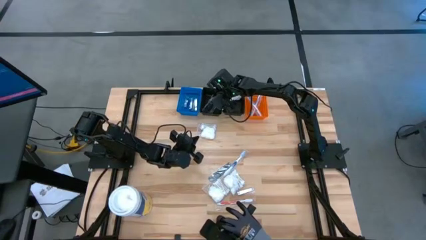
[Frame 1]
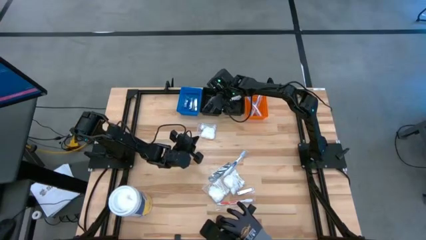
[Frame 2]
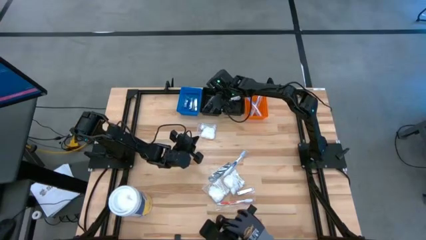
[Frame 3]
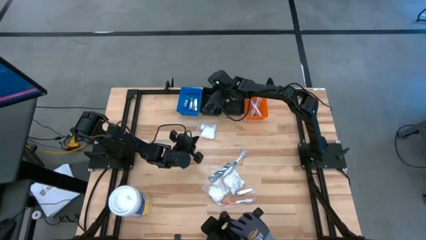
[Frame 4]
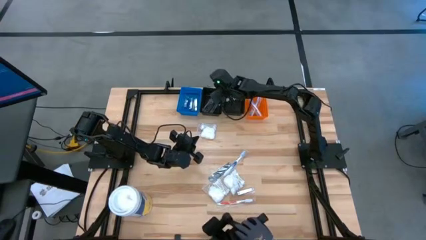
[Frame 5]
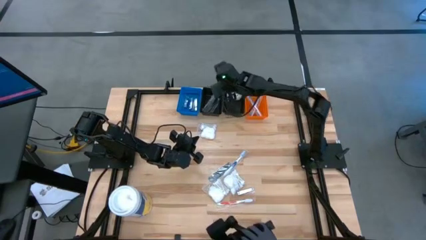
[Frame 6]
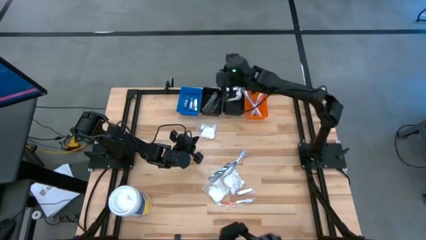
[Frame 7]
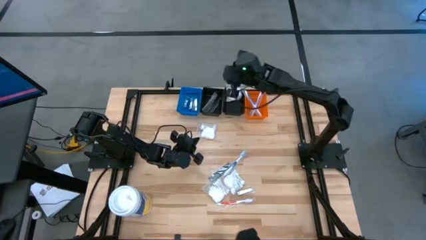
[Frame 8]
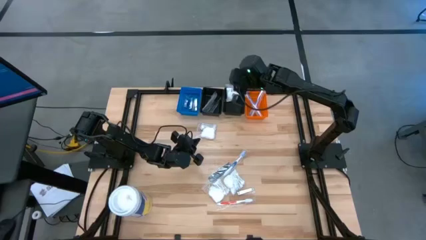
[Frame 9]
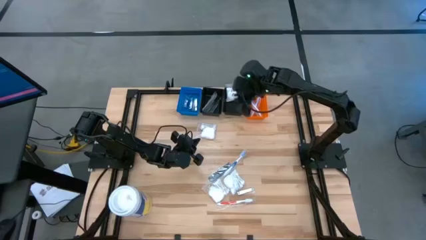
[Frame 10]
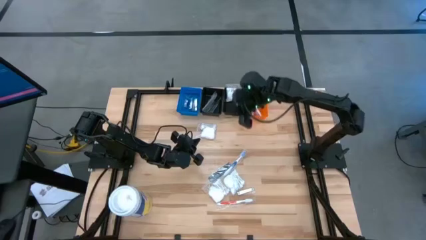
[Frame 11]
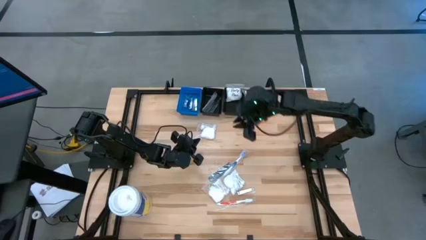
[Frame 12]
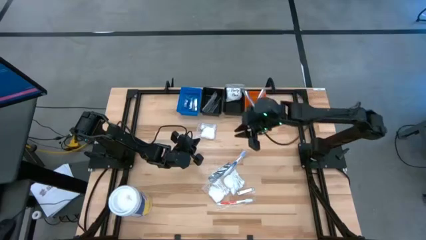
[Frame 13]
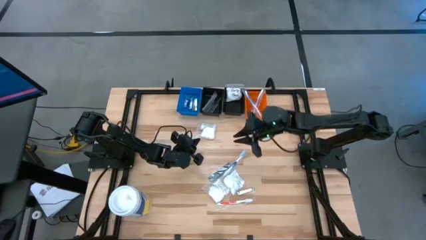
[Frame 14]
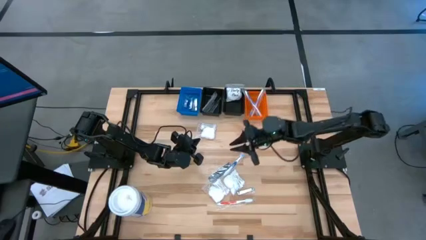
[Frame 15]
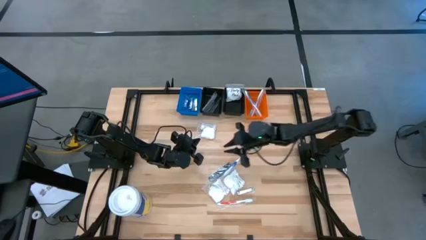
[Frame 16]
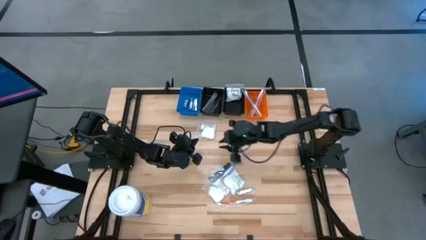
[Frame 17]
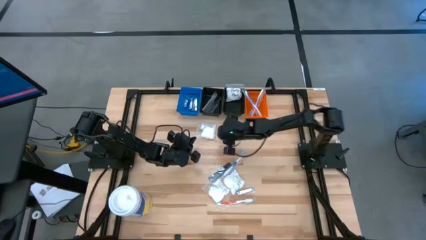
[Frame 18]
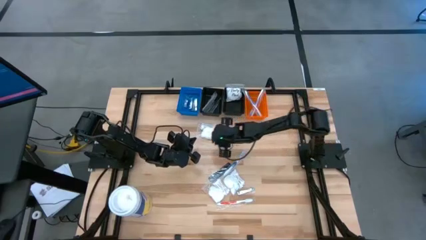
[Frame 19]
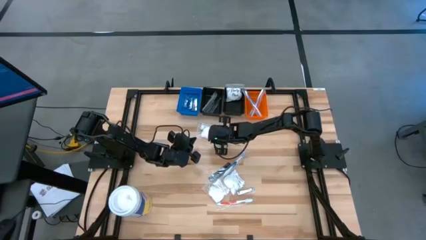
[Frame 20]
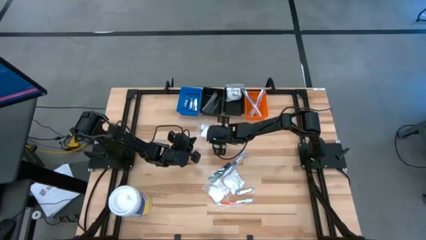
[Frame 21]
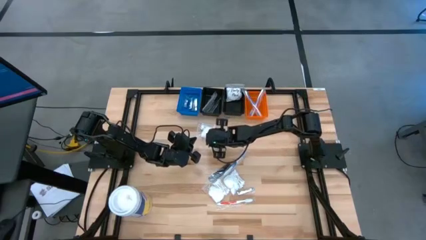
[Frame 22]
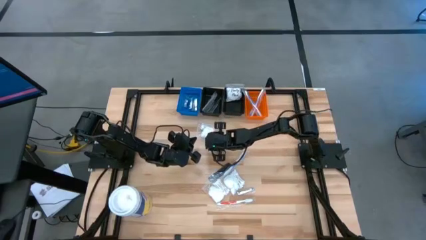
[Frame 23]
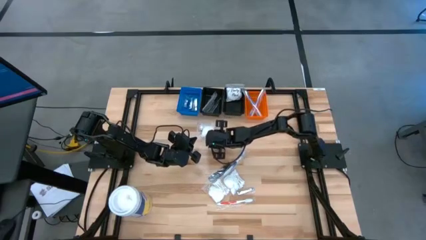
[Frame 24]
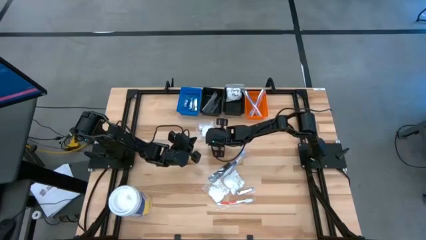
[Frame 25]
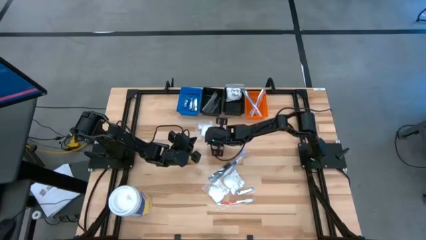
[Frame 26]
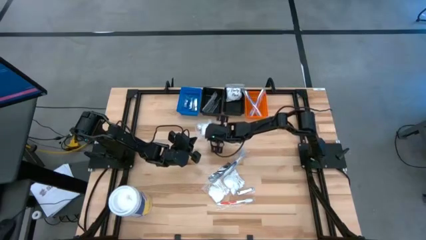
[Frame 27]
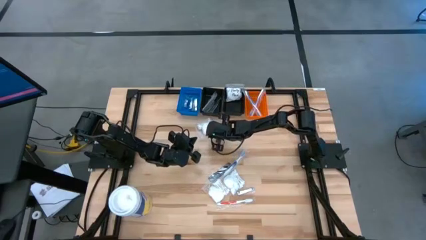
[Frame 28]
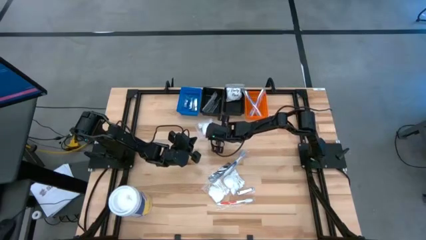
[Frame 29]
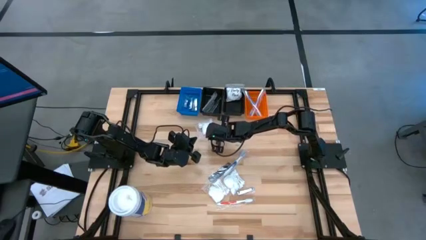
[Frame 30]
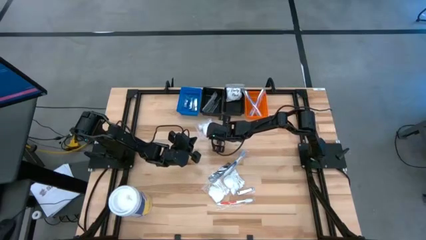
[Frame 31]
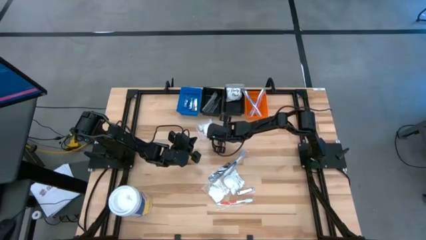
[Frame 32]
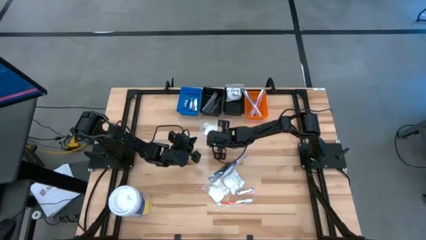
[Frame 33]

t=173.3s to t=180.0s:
Task: Pick & Place Travel size toiletries
Put the white vanity pack into the right black bin

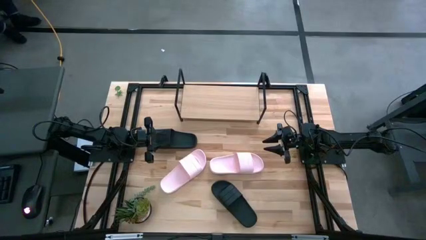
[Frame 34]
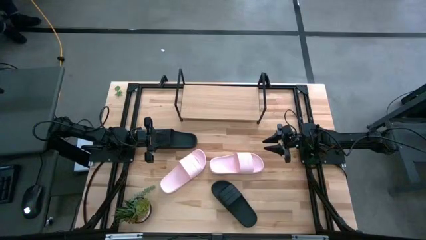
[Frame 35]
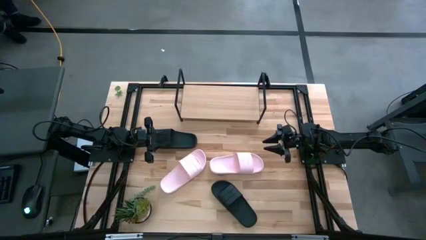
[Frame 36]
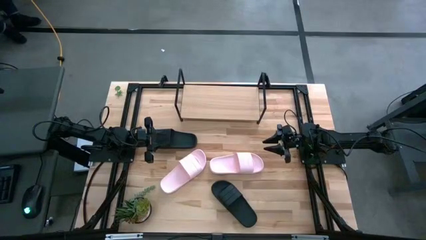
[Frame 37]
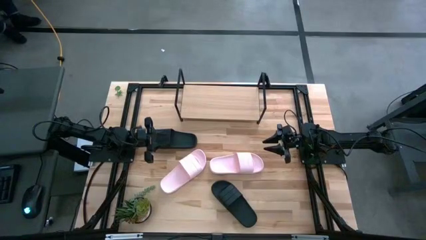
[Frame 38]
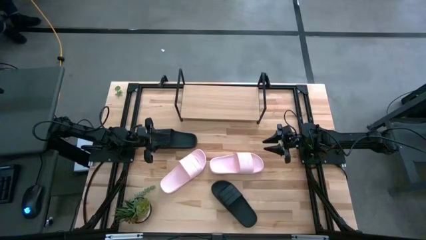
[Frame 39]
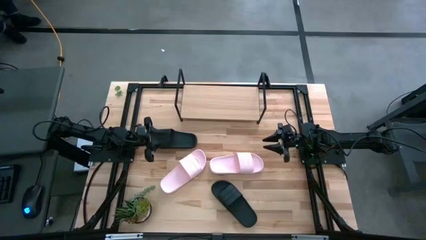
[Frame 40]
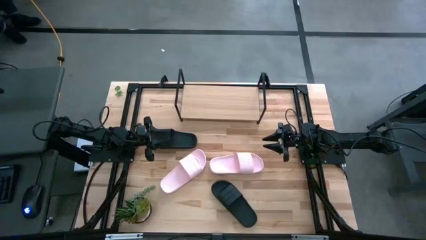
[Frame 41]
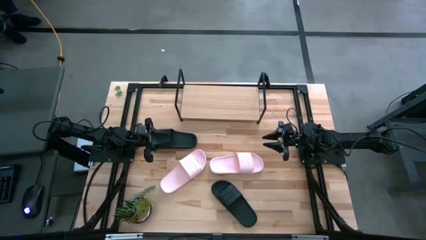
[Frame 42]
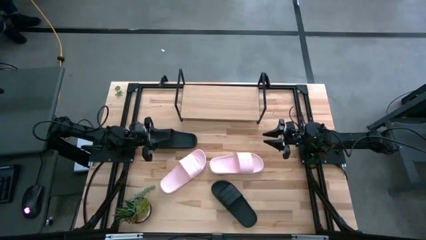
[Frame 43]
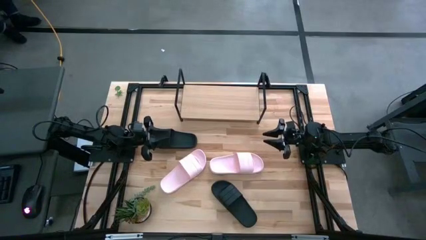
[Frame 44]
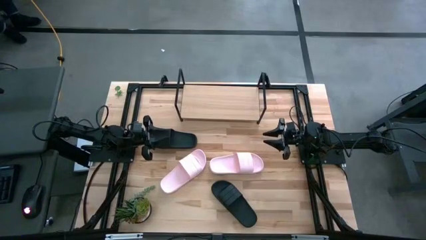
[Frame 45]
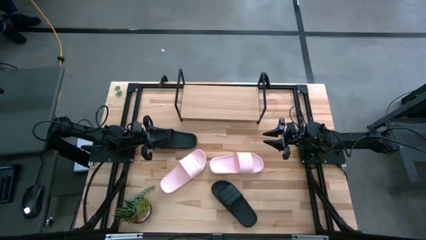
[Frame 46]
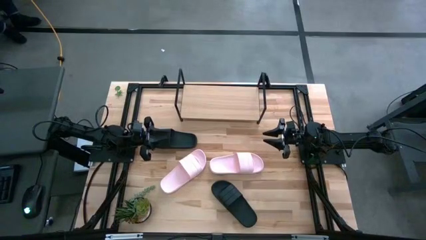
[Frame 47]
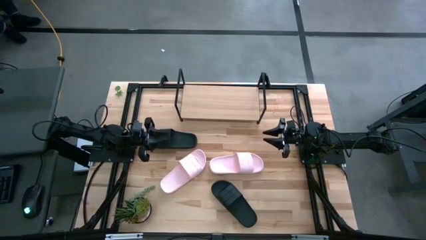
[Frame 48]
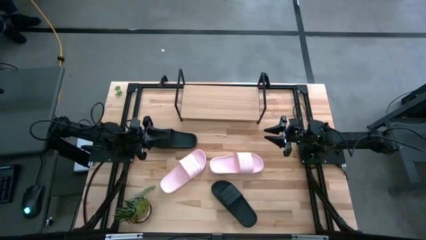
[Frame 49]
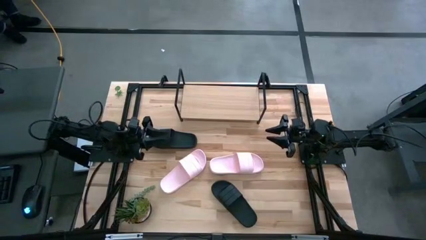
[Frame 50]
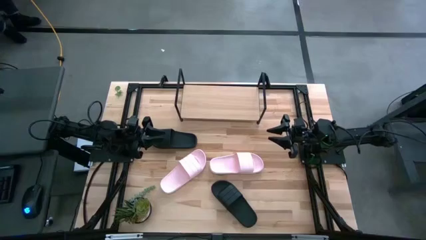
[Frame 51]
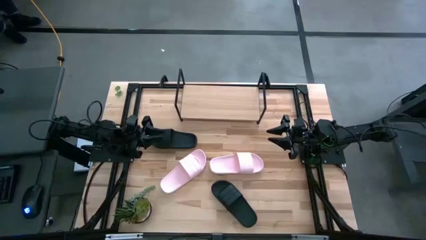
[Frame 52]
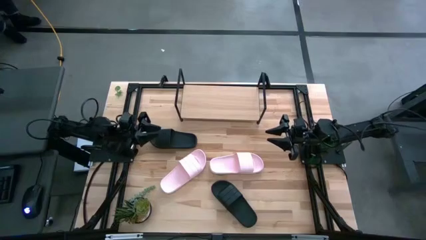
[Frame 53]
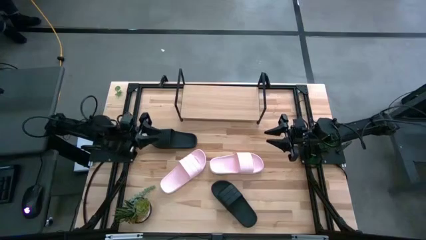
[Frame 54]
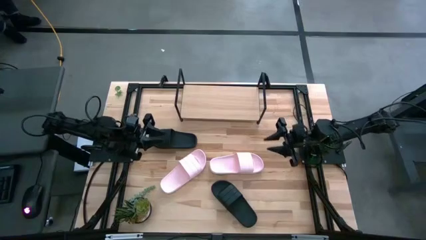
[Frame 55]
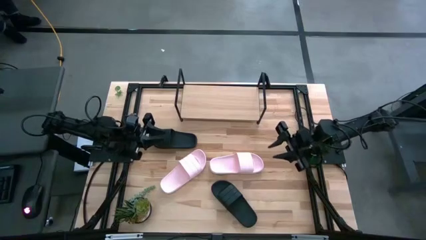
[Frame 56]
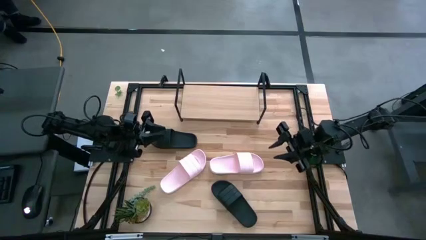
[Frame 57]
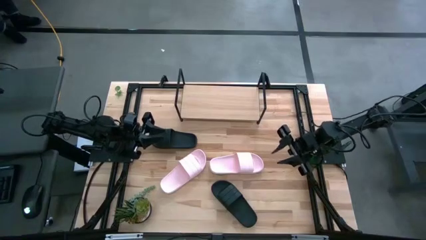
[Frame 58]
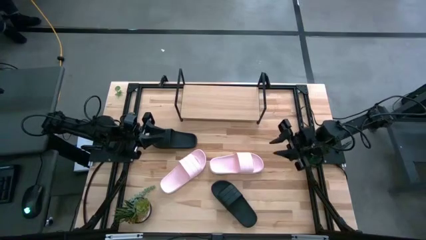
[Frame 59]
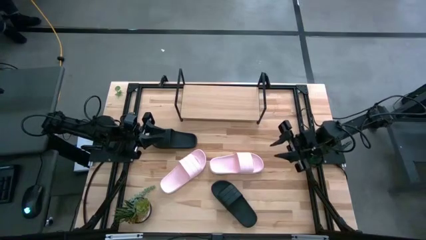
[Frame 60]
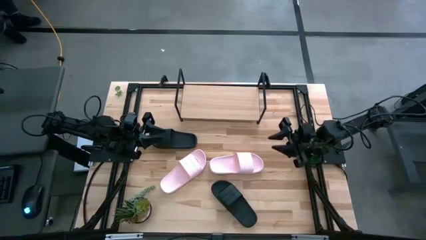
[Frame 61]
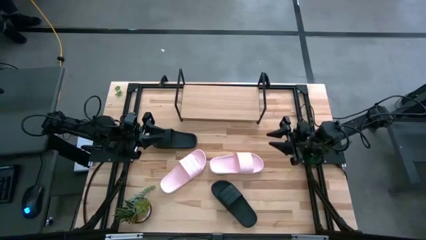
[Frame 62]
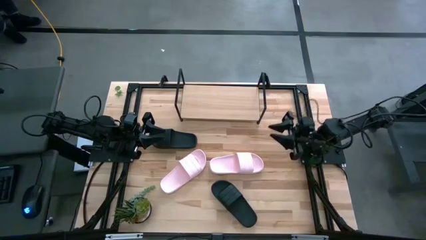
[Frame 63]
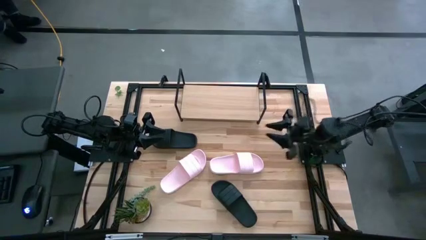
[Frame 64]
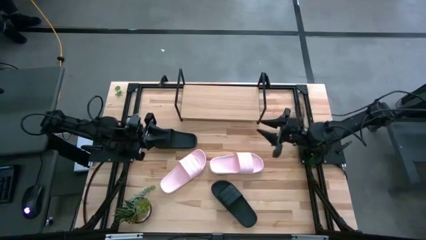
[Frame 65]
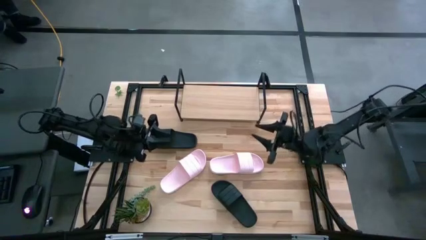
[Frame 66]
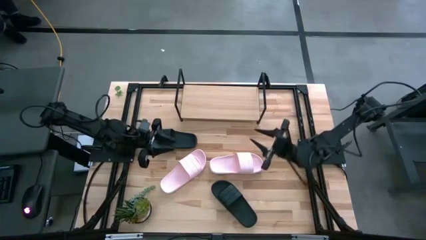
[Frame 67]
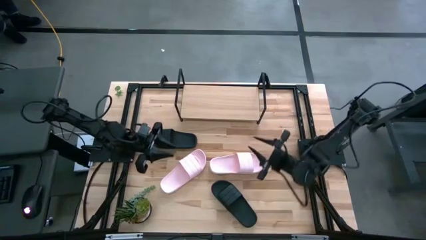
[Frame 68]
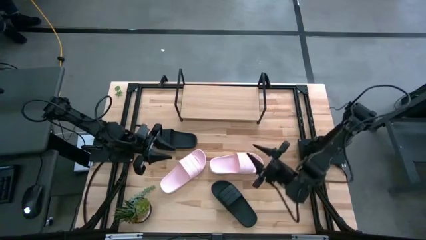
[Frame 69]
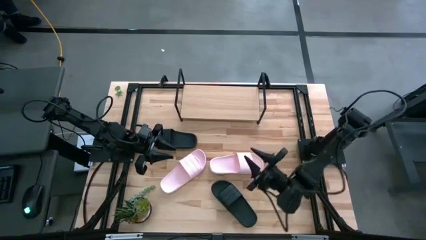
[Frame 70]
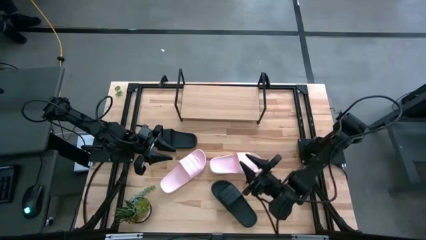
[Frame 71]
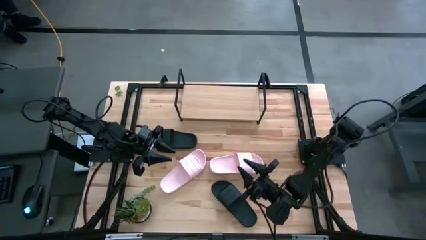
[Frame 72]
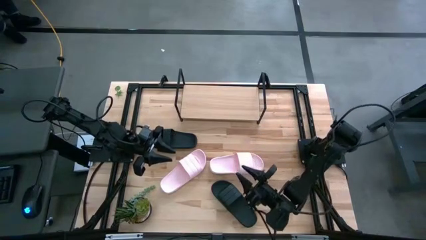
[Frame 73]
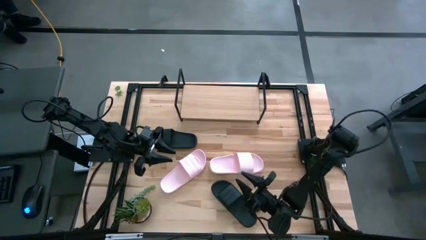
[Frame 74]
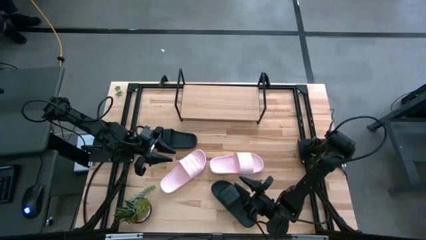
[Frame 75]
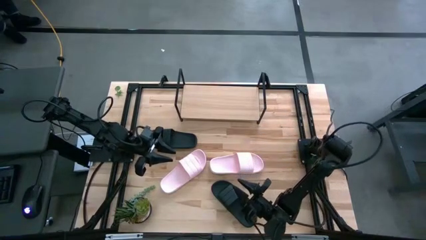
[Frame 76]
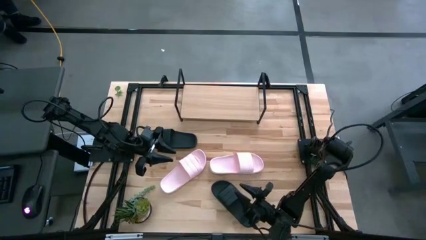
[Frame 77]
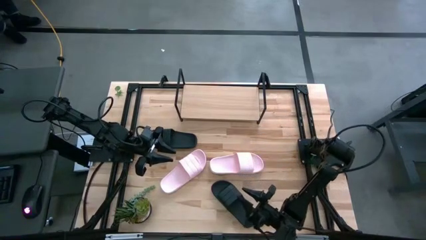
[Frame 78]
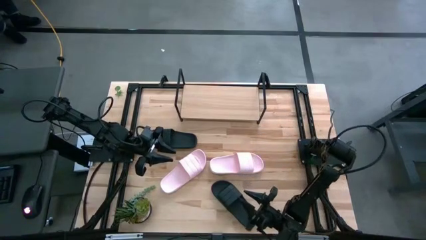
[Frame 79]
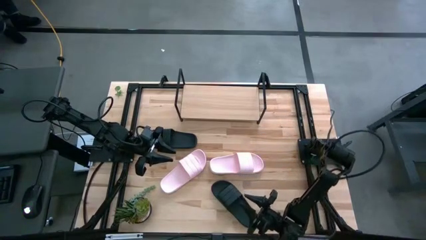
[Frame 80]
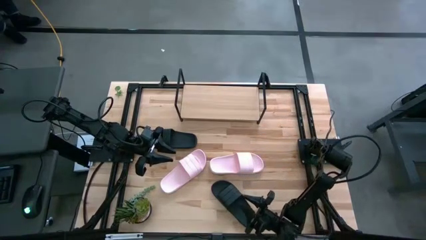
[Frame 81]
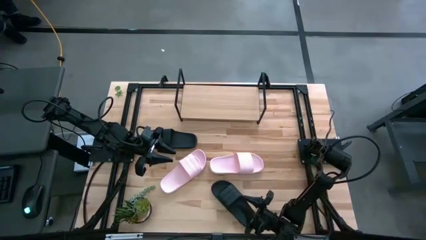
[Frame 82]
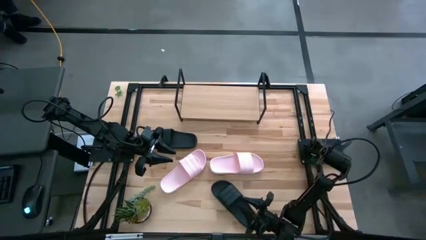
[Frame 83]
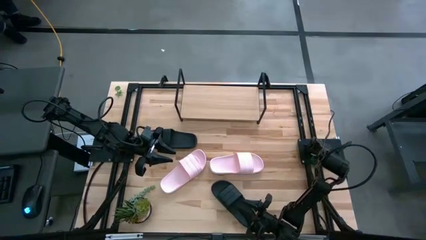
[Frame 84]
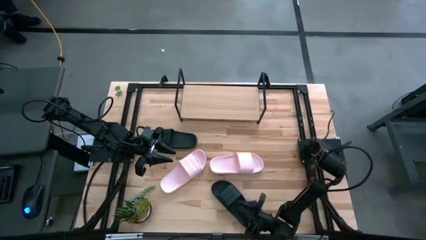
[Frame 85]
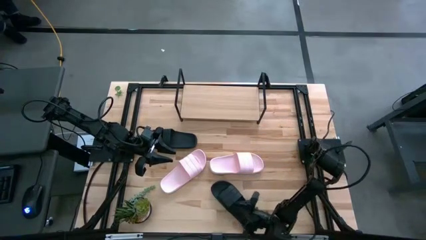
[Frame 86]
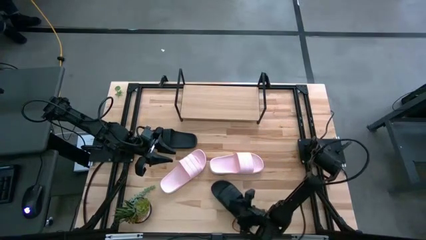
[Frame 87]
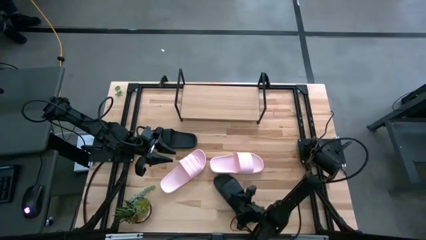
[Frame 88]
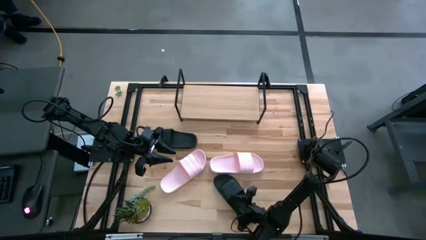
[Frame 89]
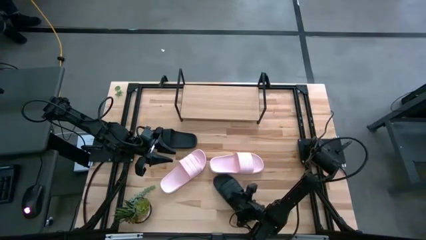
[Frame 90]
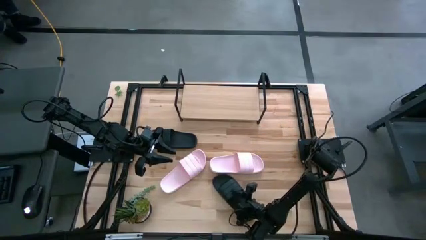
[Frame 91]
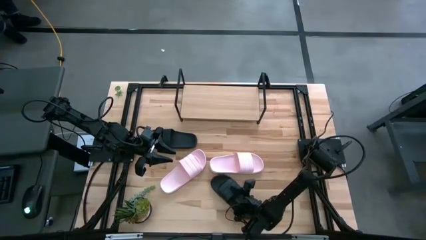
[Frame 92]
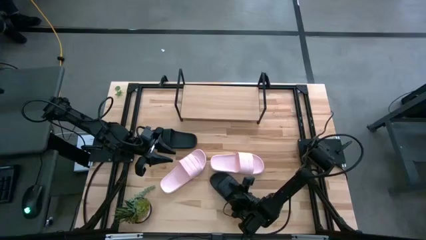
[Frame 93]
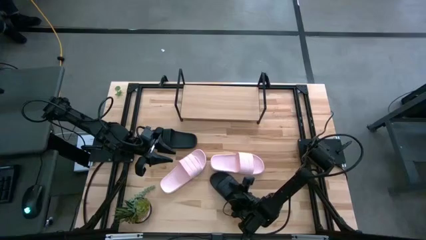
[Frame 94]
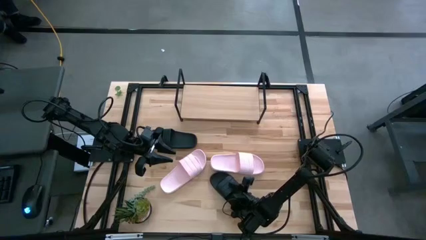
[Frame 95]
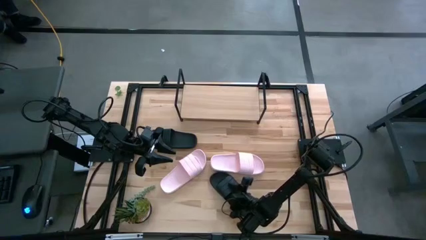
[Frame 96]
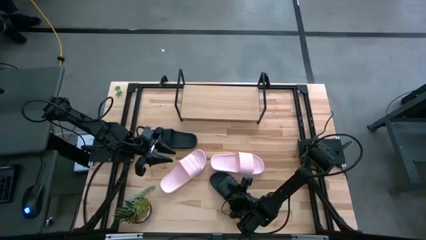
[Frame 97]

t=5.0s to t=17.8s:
Task: Pick and place slides into the shelf
Put the bottom black slide on the shelf
